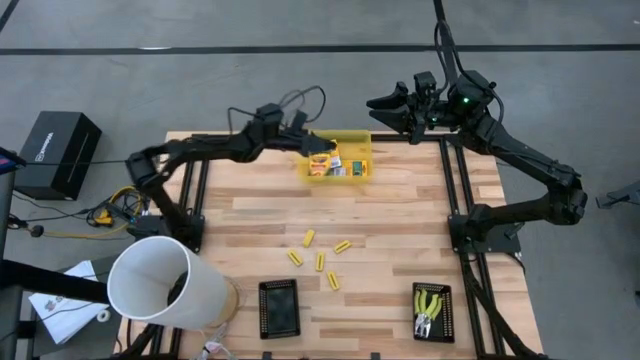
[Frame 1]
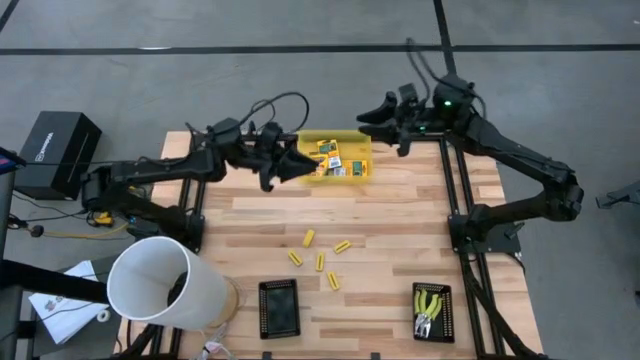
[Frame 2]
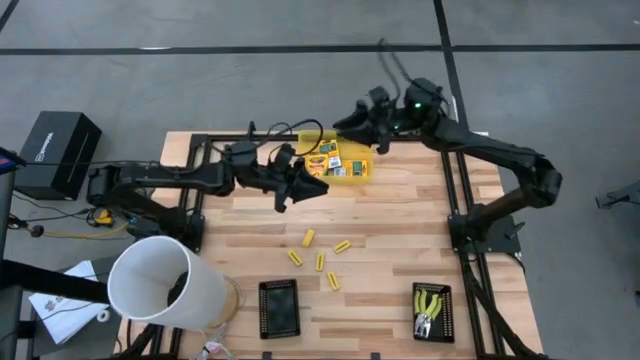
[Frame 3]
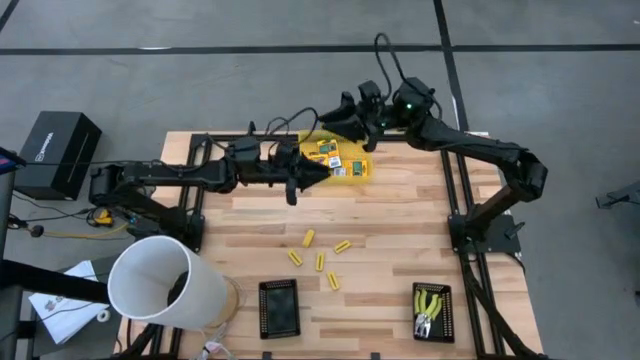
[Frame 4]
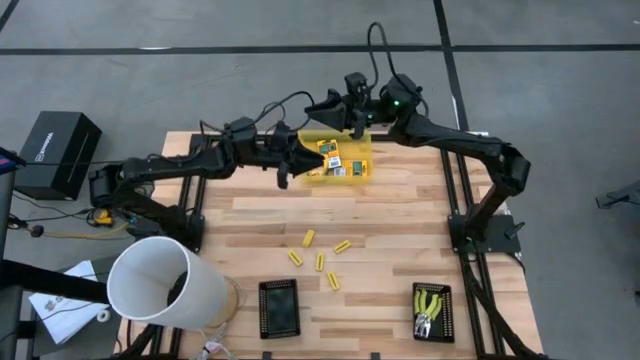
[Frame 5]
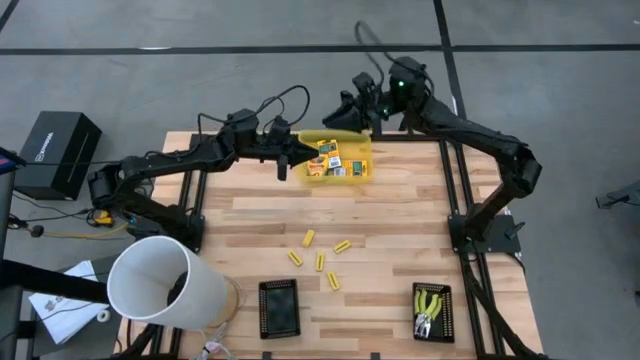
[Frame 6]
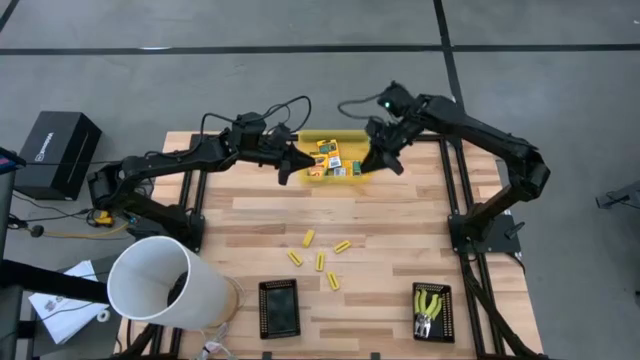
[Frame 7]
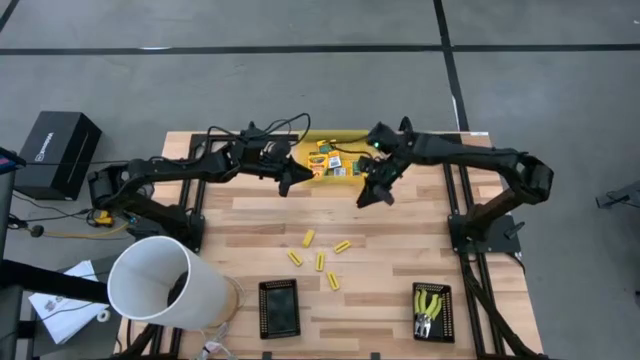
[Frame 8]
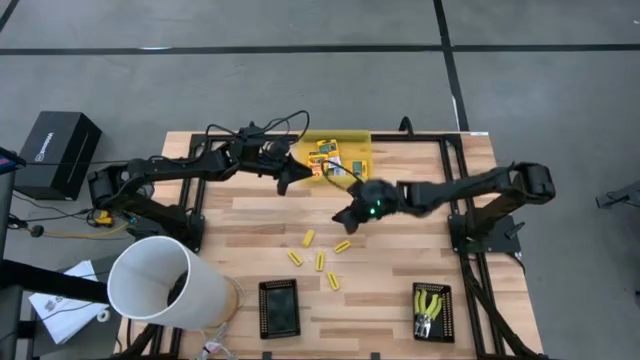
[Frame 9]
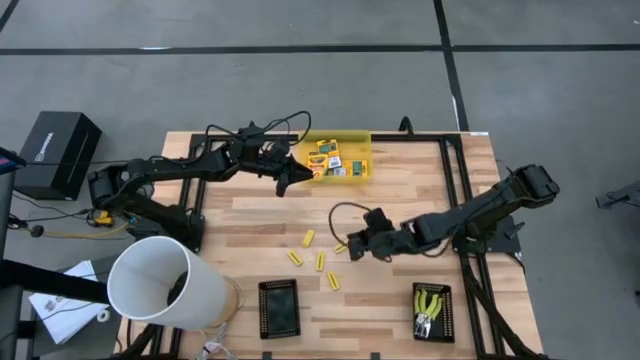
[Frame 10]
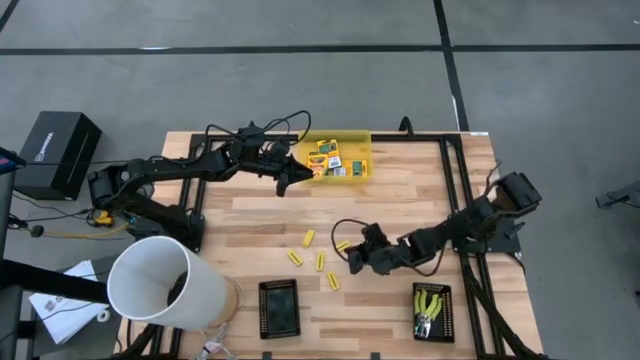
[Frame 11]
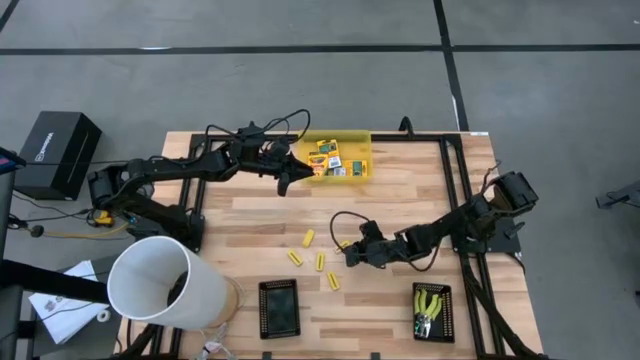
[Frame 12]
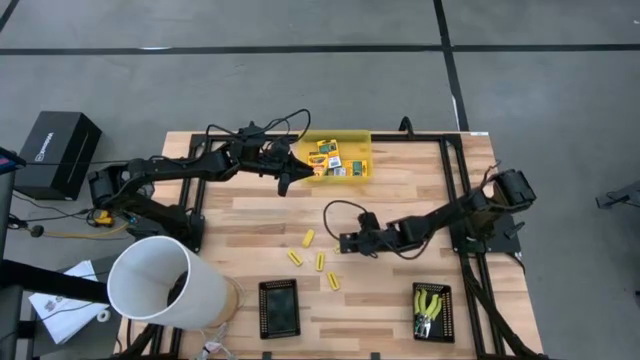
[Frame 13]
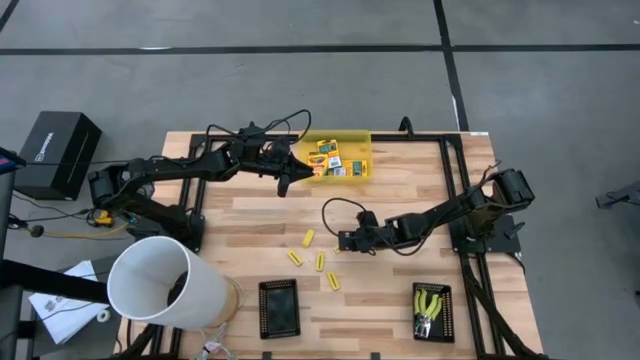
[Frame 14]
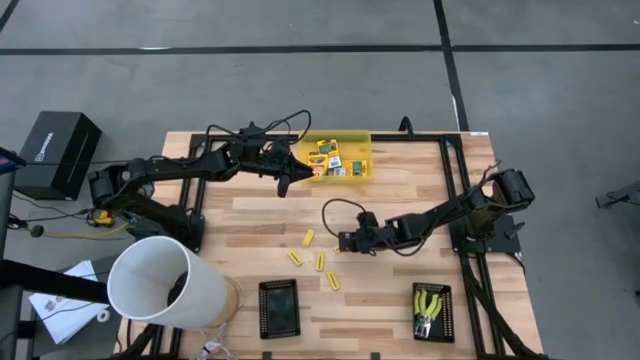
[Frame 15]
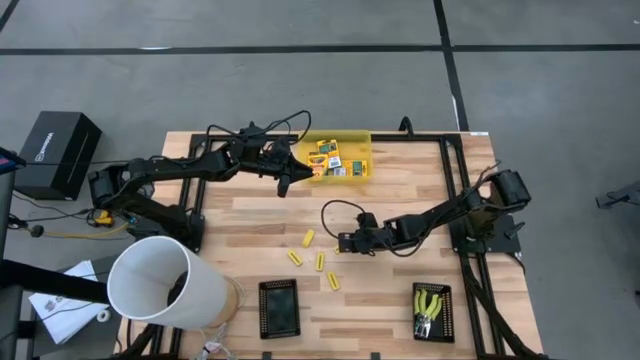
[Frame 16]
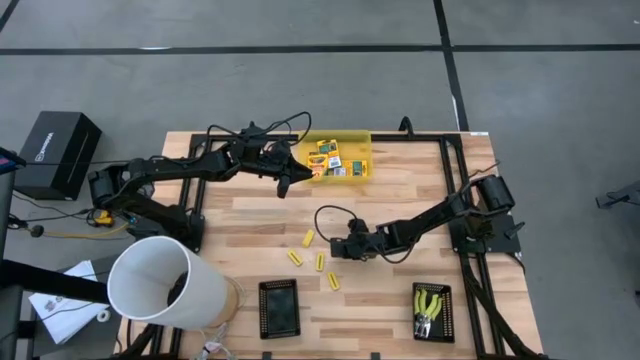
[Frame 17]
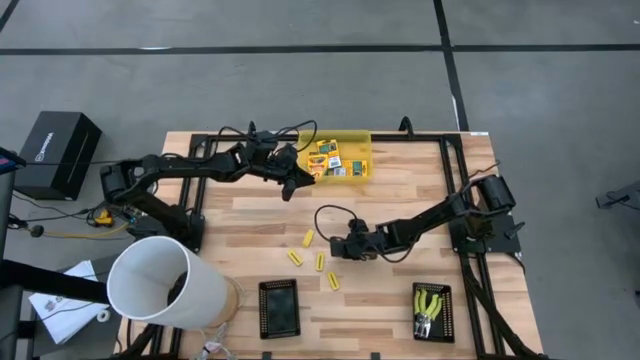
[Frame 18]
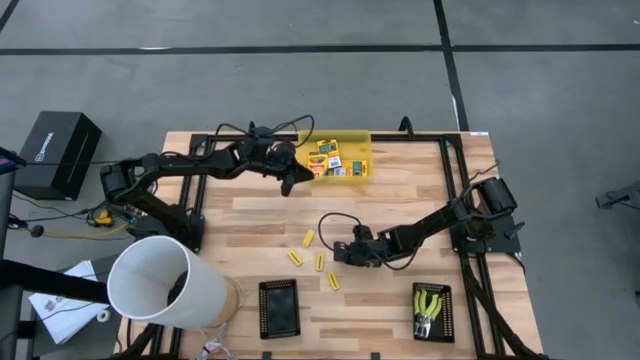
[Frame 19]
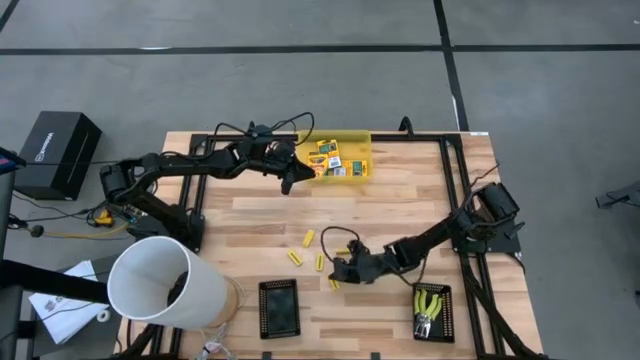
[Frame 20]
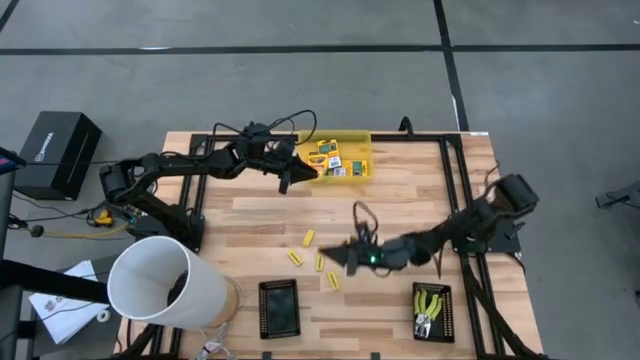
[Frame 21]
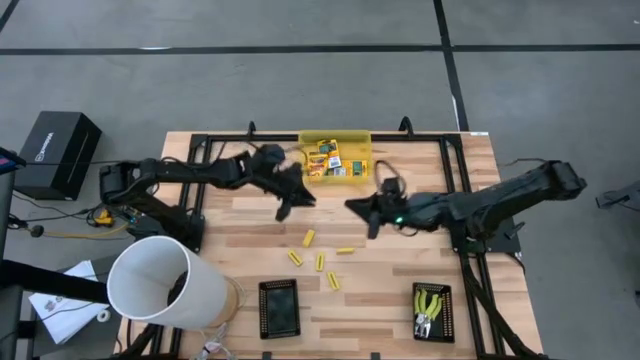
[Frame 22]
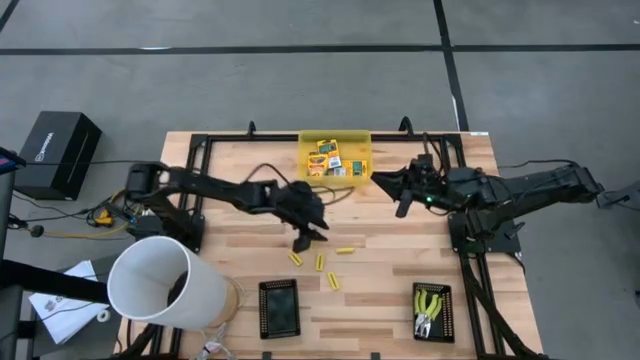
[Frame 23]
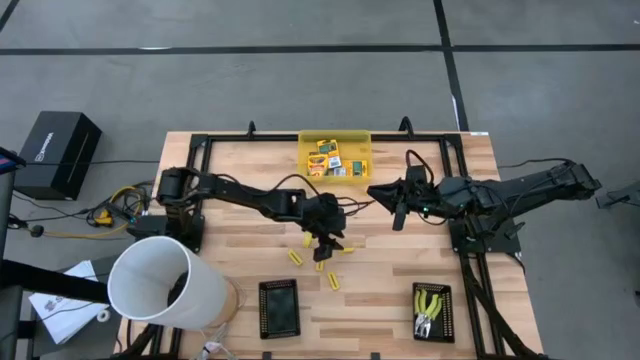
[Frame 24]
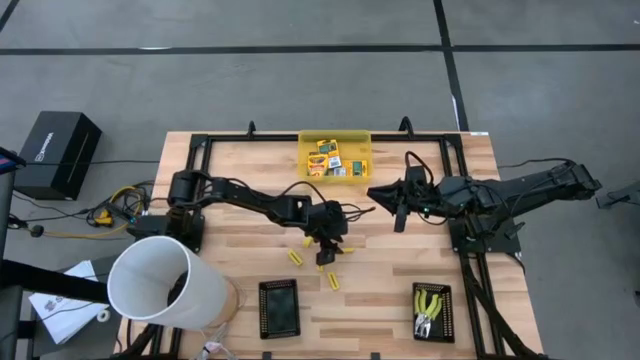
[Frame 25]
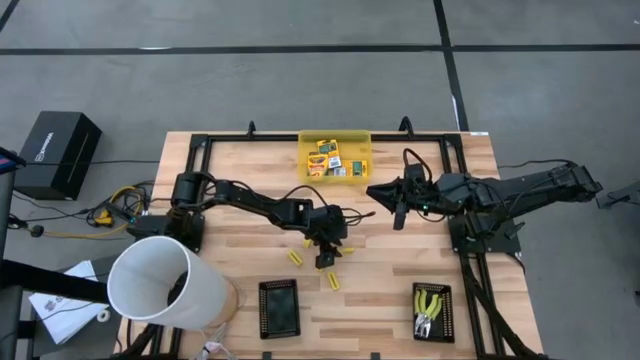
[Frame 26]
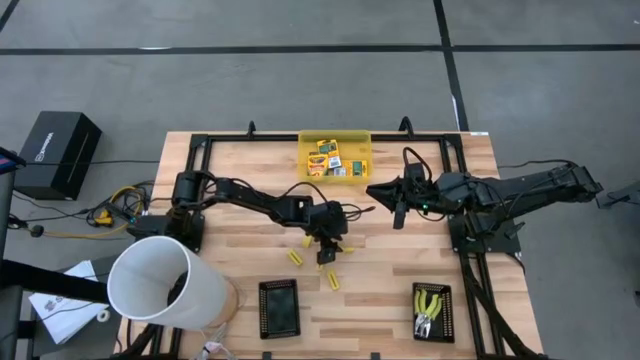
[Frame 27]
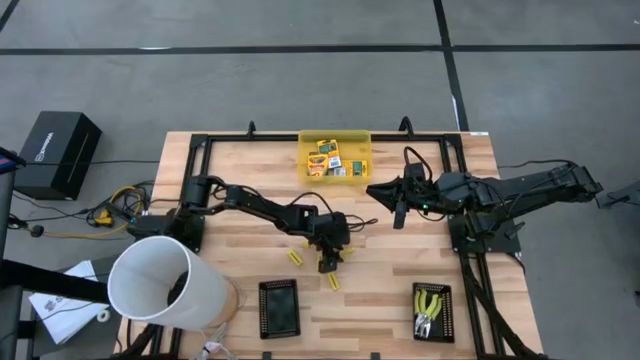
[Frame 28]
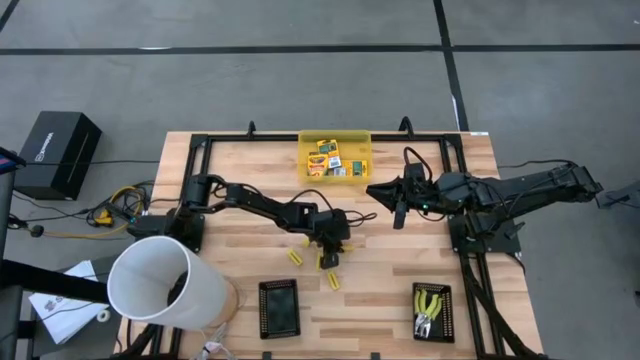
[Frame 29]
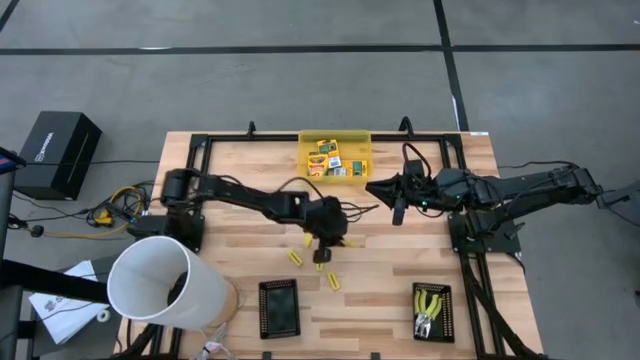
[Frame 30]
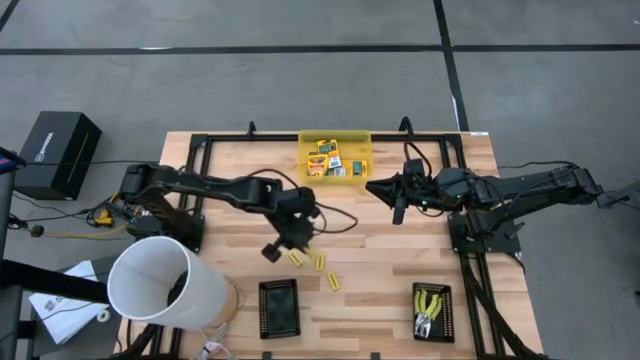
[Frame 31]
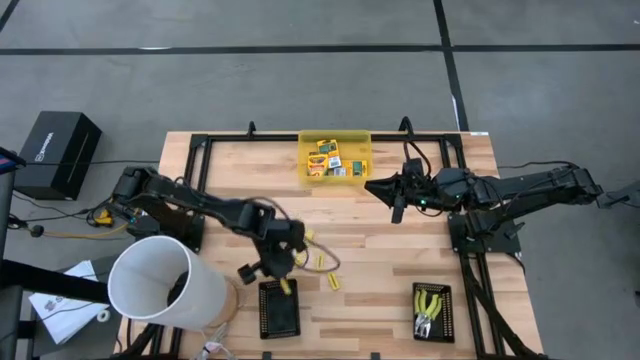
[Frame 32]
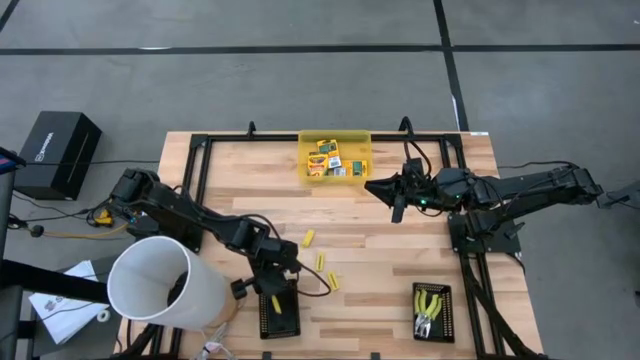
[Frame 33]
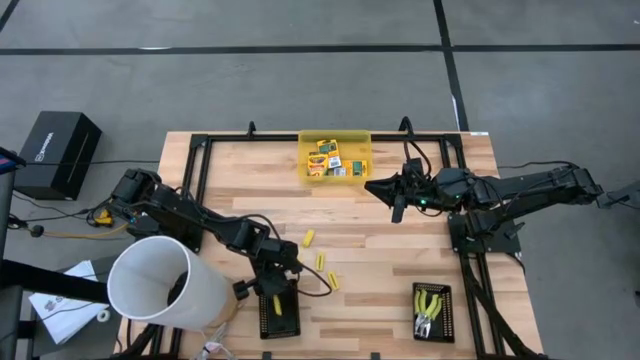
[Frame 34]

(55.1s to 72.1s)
Task: Pick & Place School Supplies
Put the yellow eraser into the left black bin

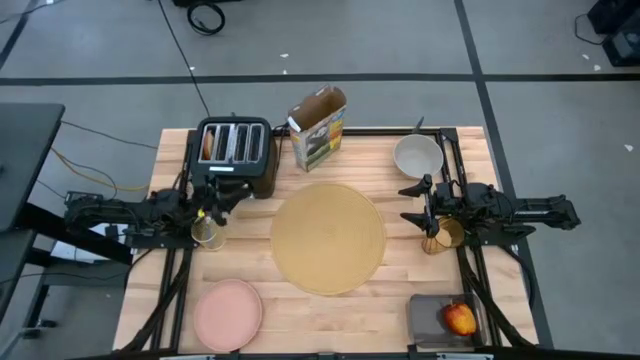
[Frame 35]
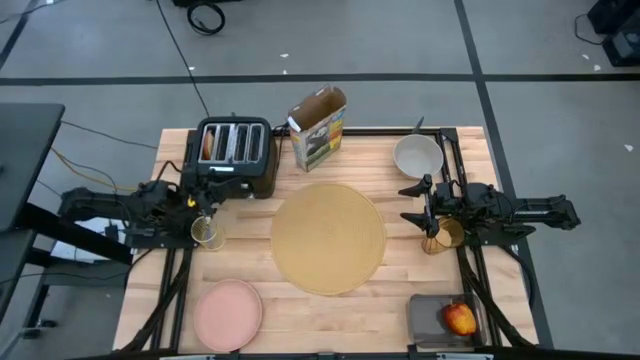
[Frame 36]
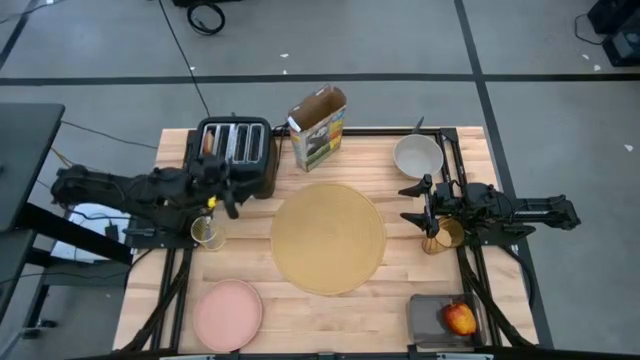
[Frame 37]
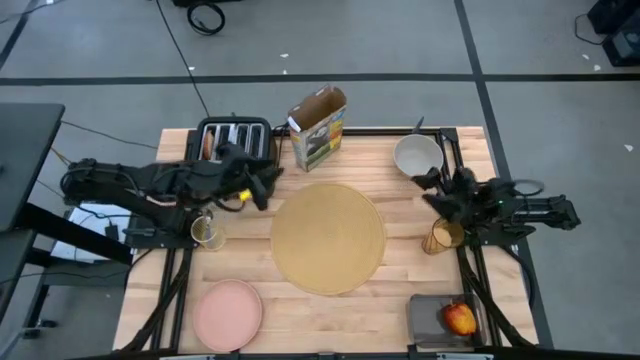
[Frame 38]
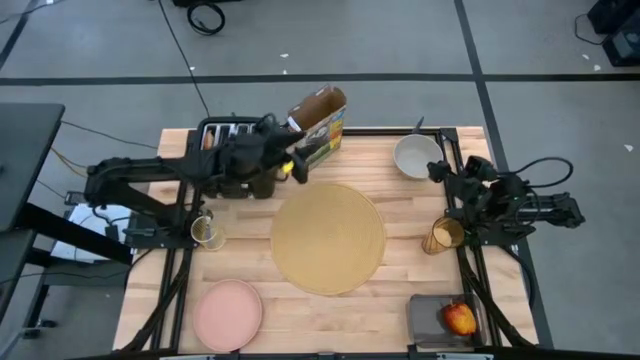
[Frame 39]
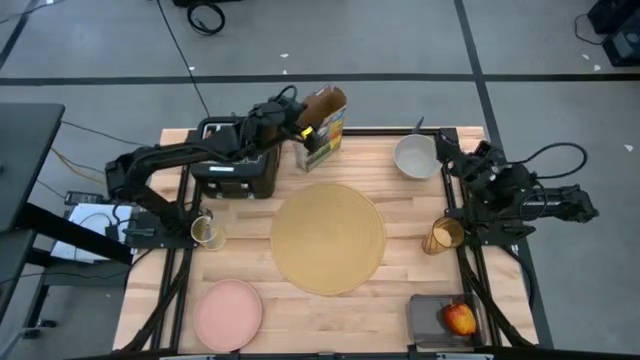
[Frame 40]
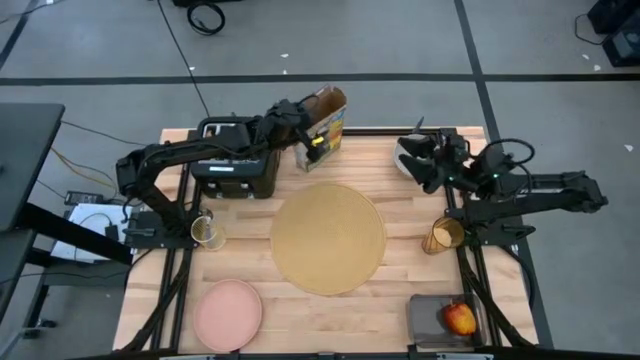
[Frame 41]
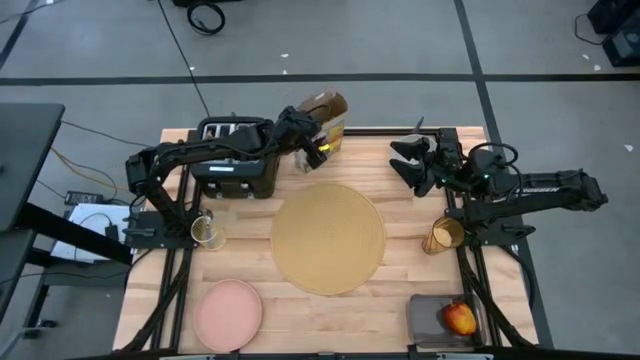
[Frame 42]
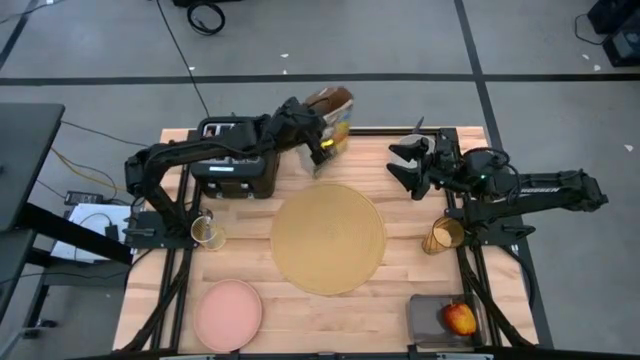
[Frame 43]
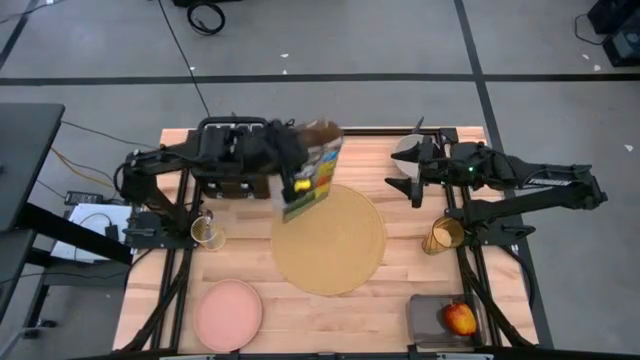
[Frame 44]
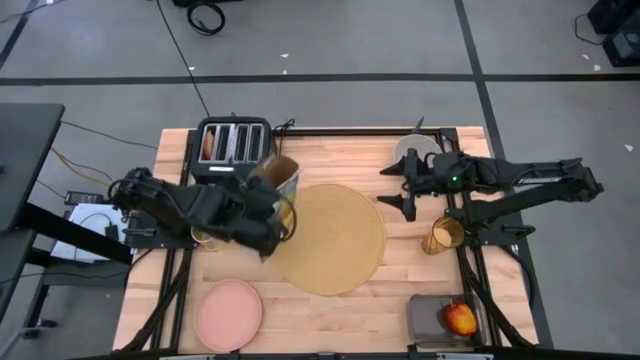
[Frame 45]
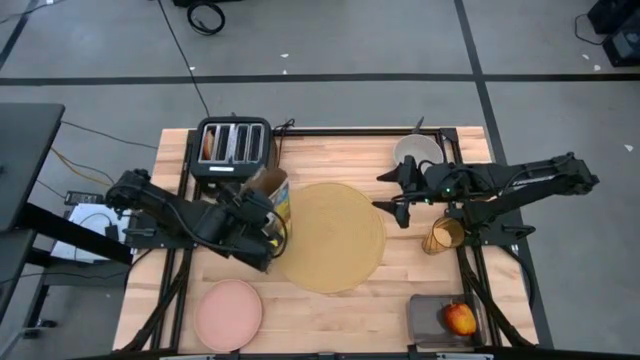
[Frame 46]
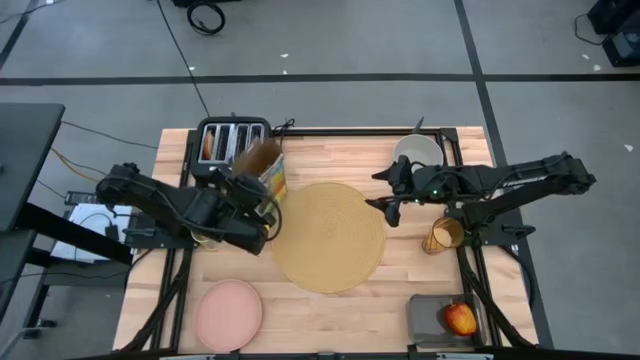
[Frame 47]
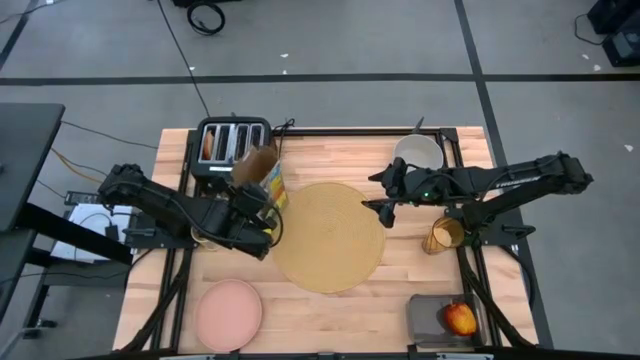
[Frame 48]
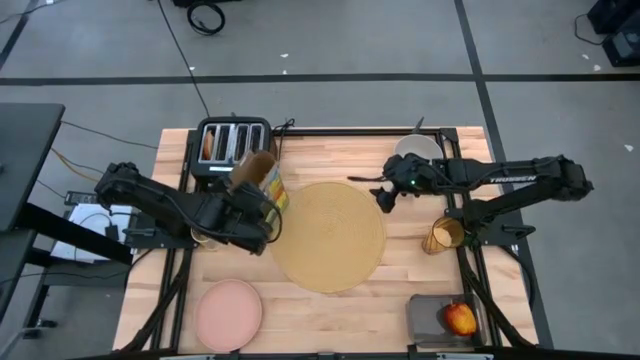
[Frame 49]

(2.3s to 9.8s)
Task: Arrange a breakfast setting
Move the cereal box to the left side of the placemat
